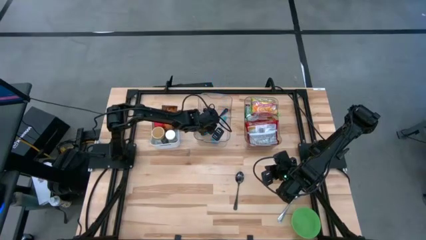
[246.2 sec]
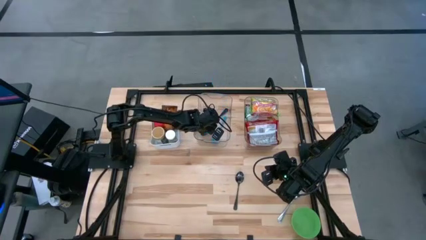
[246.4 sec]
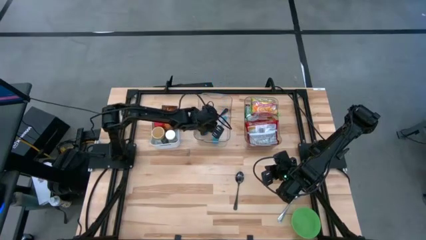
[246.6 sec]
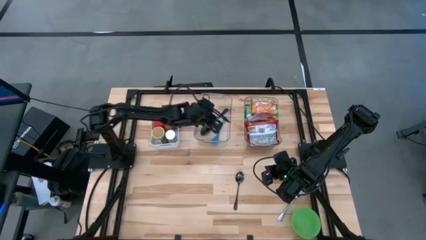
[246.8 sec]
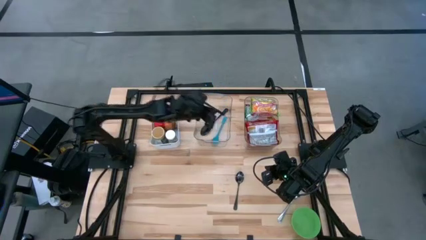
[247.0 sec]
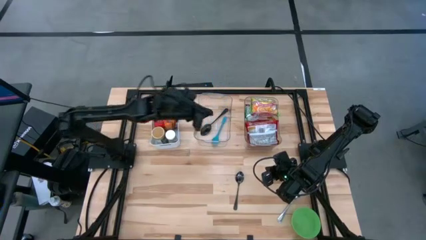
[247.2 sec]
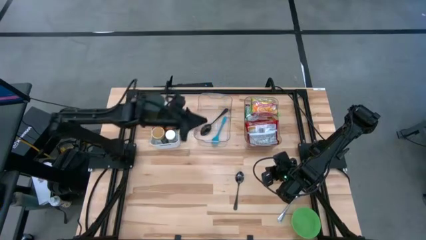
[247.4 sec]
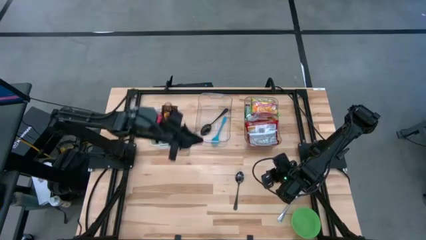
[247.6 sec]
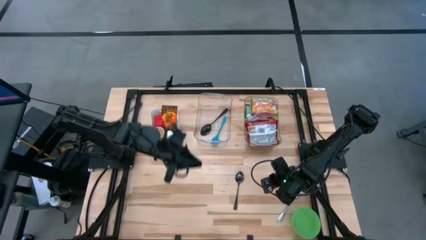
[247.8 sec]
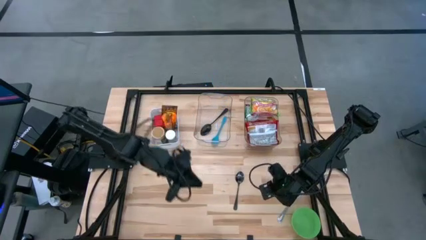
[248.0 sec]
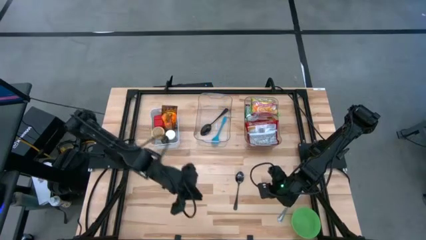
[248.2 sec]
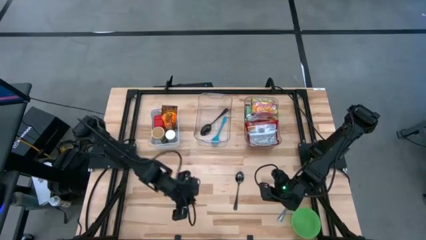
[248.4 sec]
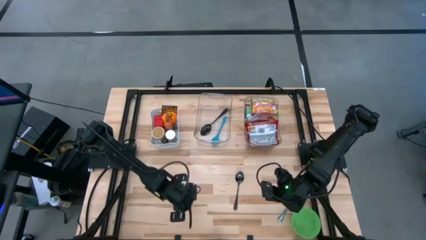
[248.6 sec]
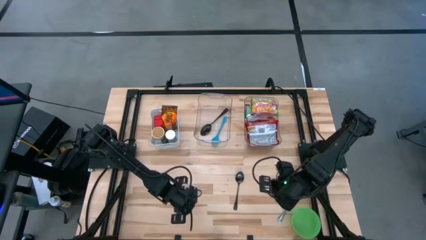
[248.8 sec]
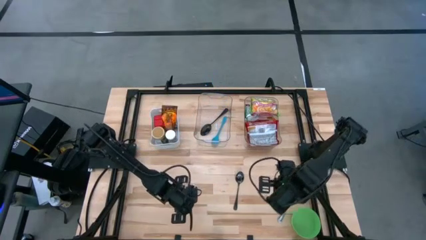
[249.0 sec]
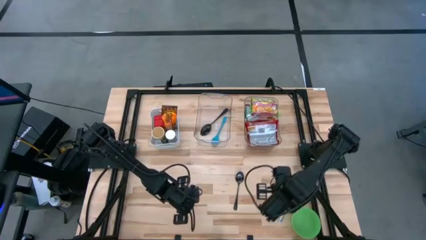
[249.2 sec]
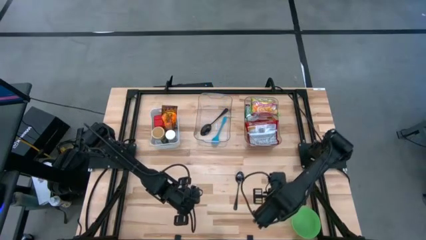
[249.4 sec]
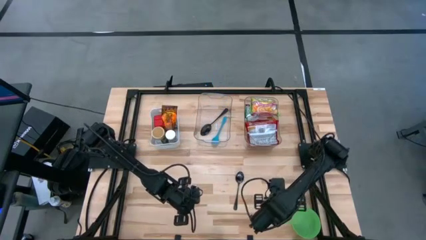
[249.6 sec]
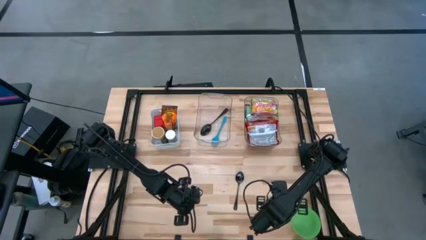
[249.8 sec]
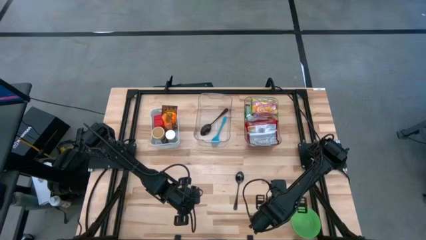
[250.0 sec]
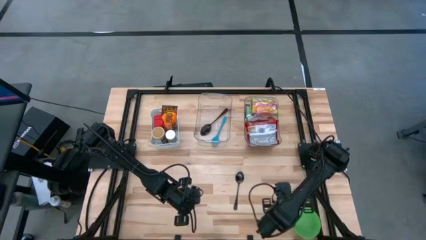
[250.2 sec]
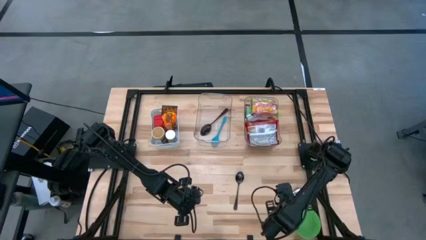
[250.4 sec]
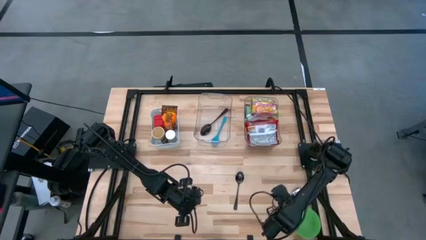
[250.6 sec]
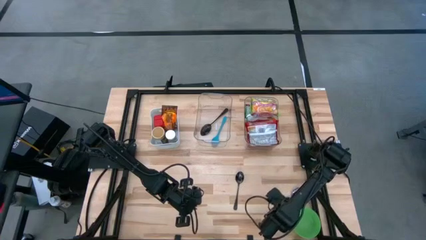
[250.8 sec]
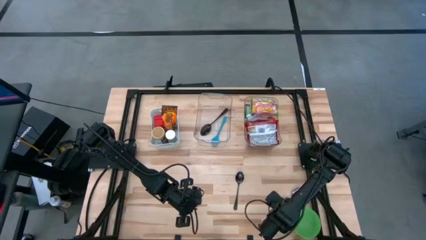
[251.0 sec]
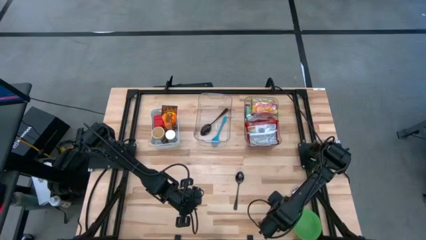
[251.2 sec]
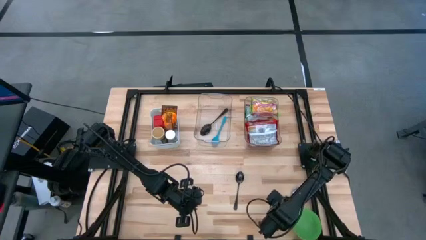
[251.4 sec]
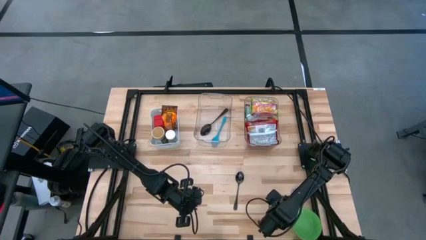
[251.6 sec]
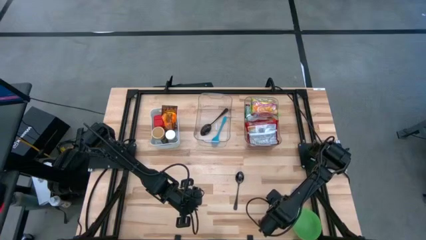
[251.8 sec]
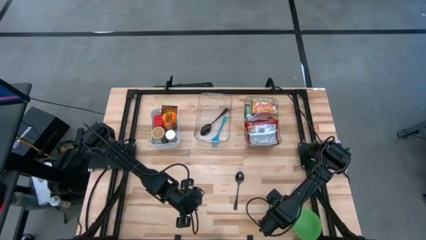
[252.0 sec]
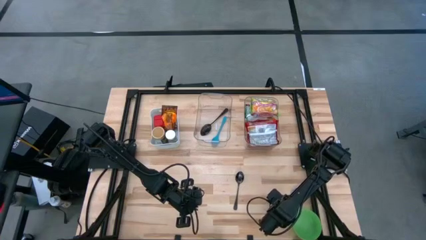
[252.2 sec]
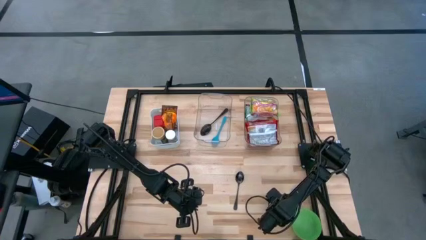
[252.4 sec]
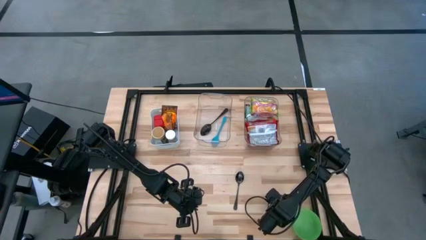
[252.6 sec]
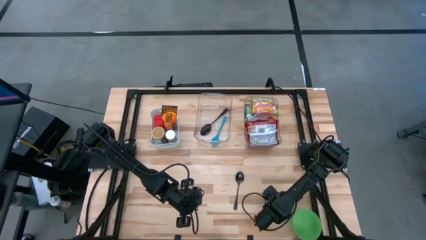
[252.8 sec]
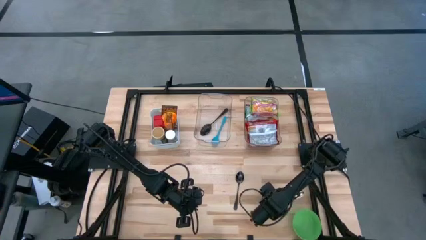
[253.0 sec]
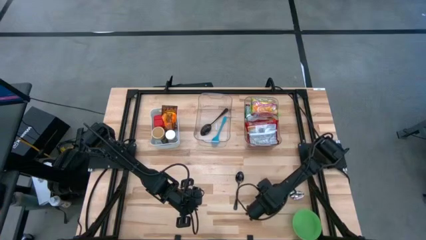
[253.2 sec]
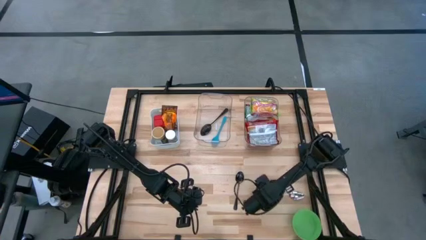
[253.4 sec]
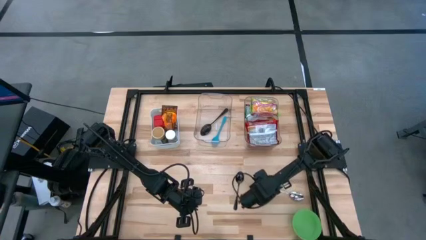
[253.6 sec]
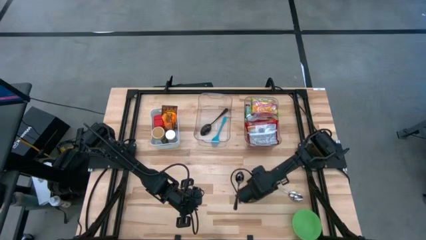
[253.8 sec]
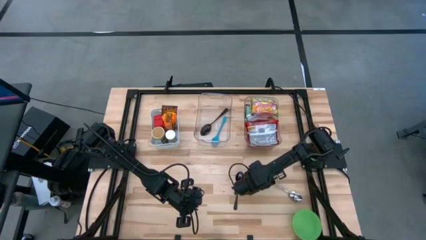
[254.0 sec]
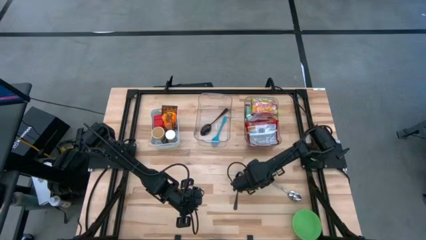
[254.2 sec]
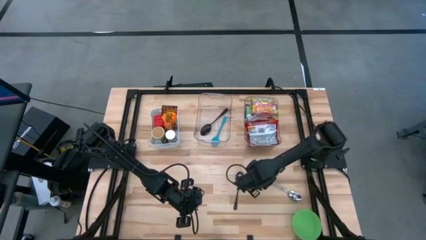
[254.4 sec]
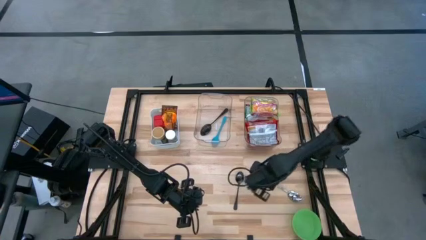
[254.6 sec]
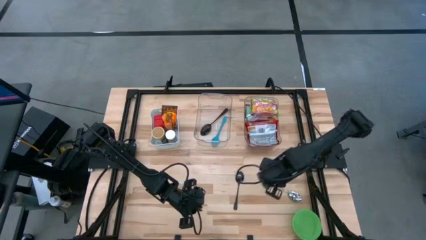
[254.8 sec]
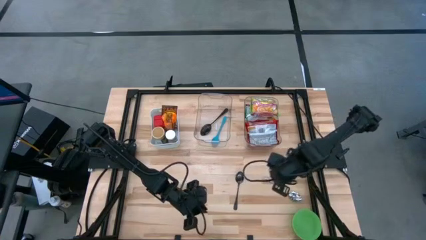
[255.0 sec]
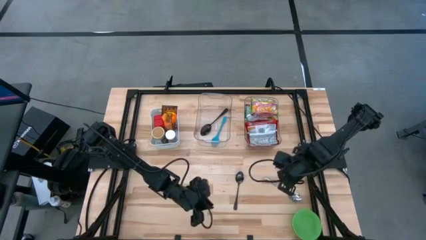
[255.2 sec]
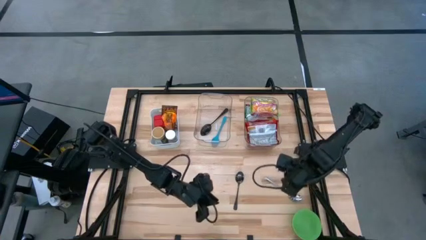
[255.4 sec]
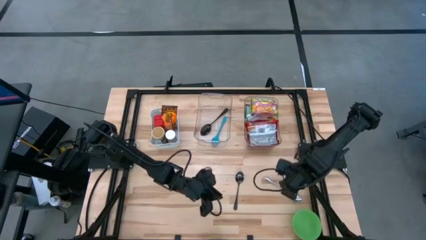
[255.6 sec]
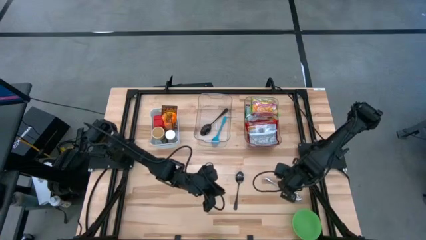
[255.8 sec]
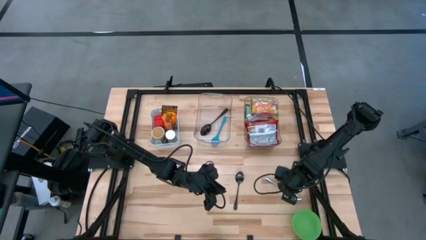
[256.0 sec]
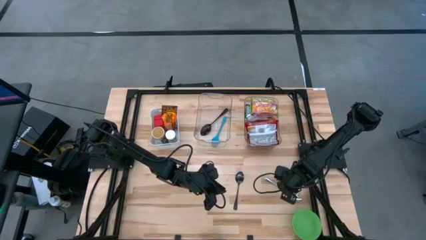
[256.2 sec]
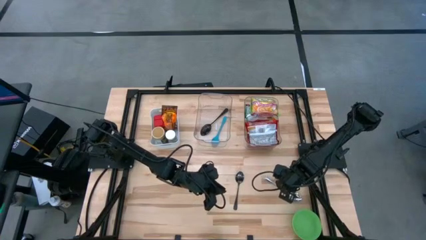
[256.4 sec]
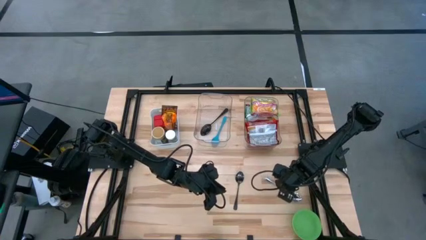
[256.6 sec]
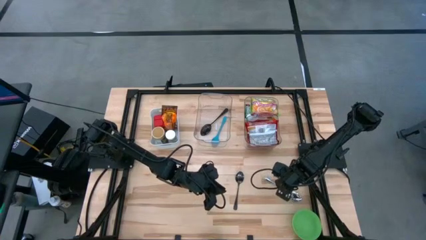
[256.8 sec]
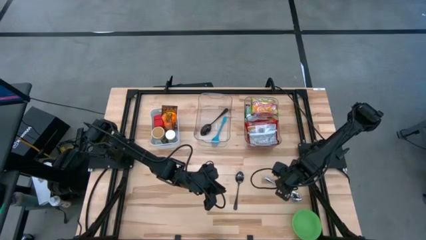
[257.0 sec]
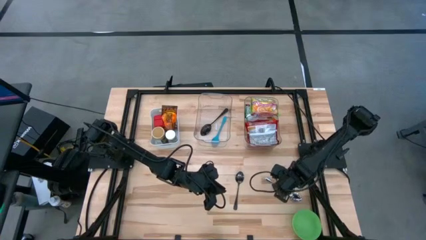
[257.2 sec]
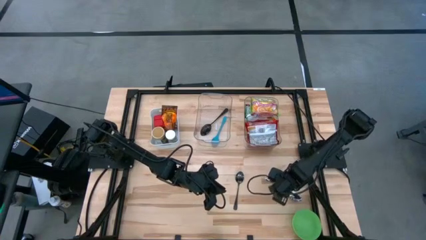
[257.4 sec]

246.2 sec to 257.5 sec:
Task: Pick & Place Food Item
Put the silver spoon into the left transparent bin
